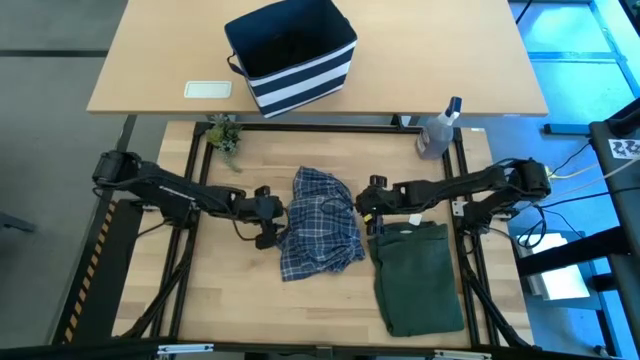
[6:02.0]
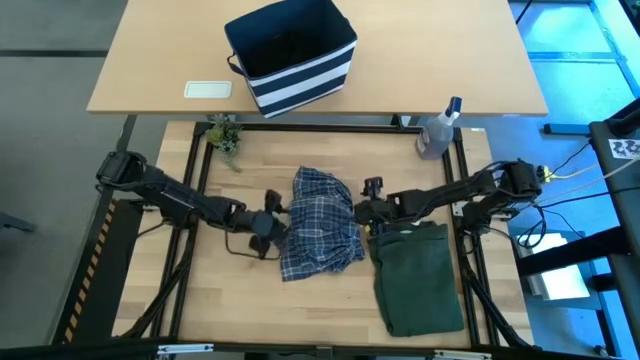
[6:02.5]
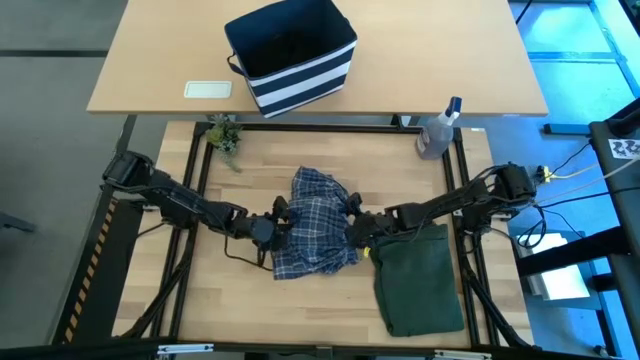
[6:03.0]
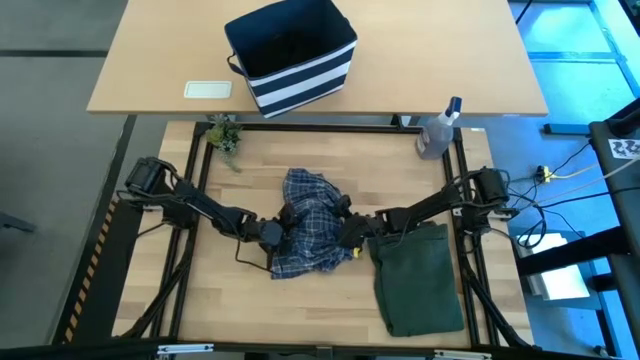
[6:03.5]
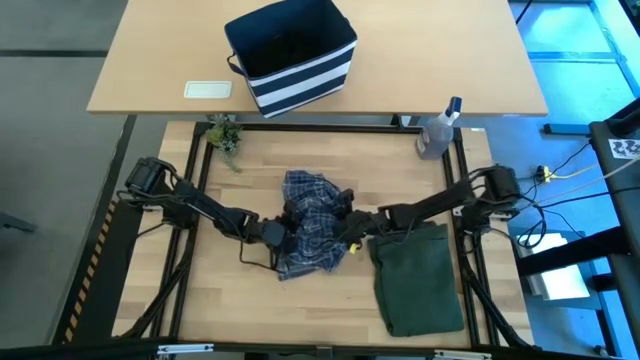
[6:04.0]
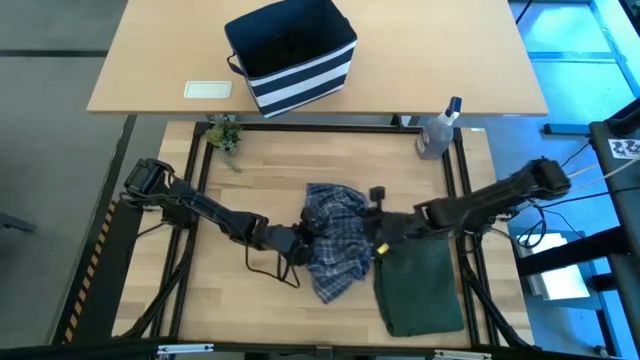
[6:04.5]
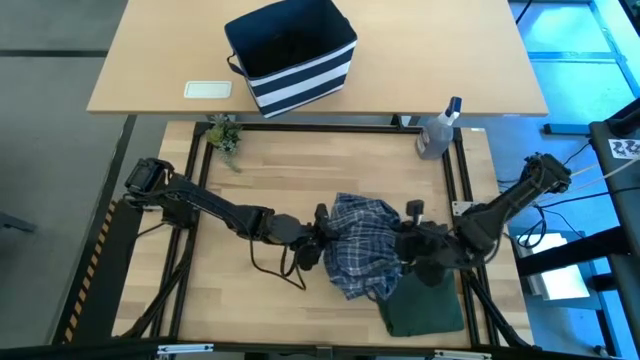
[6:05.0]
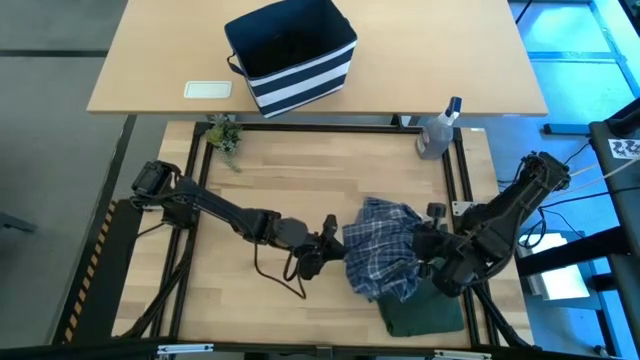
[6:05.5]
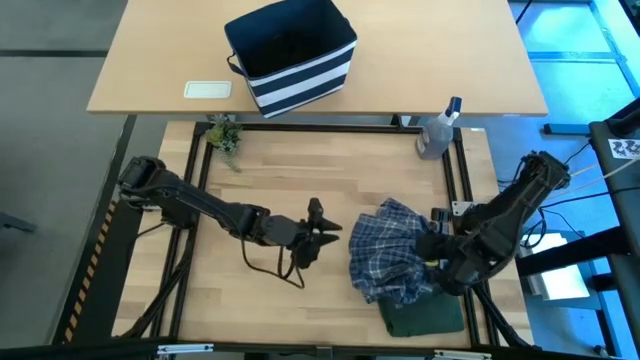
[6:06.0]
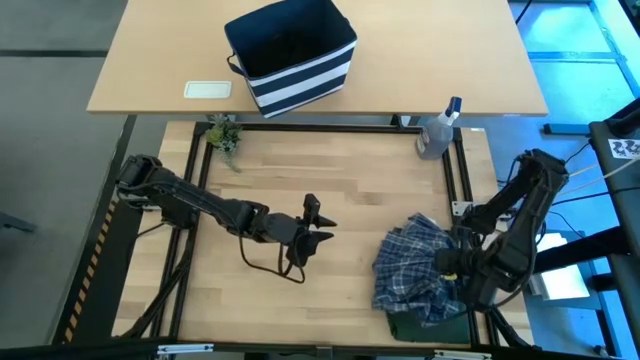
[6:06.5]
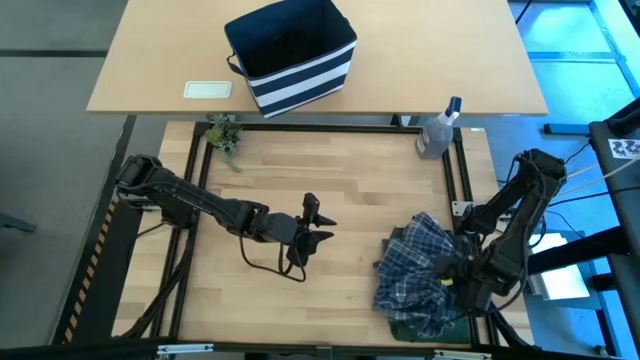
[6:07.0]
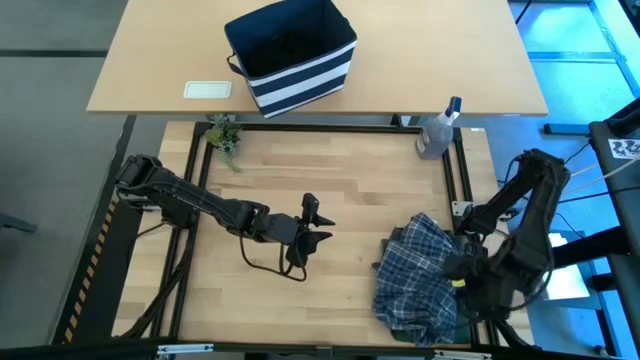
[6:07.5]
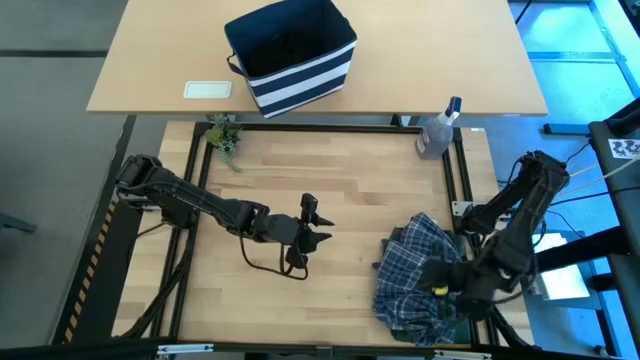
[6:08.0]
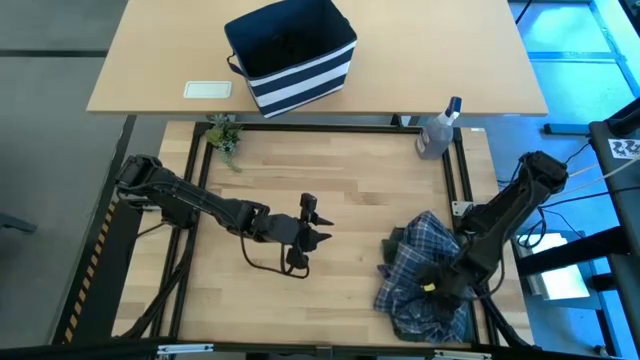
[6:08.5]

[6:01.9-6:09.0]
Task: Fold Laundry from Bin
Stack the blue checkered pants on top of the green polo shirt

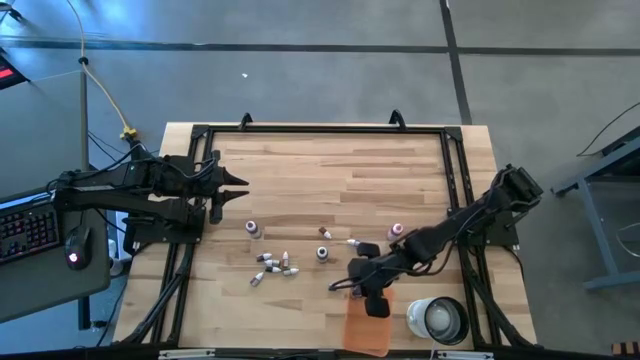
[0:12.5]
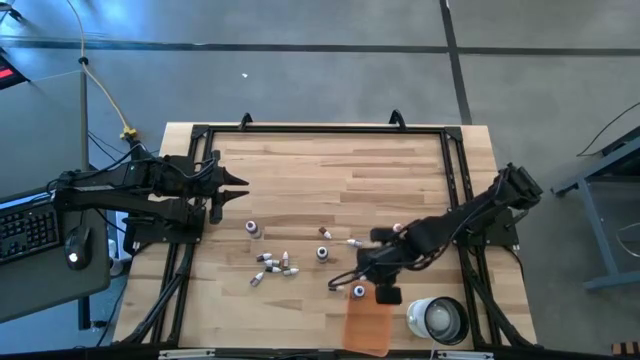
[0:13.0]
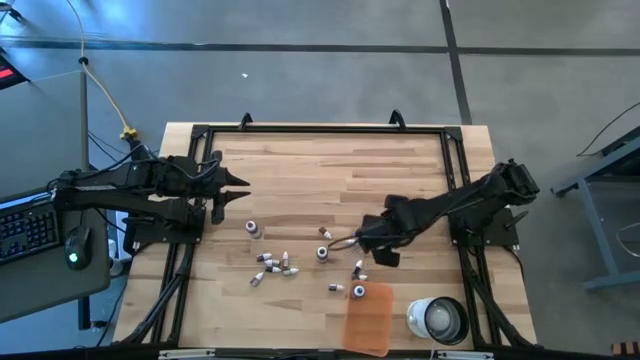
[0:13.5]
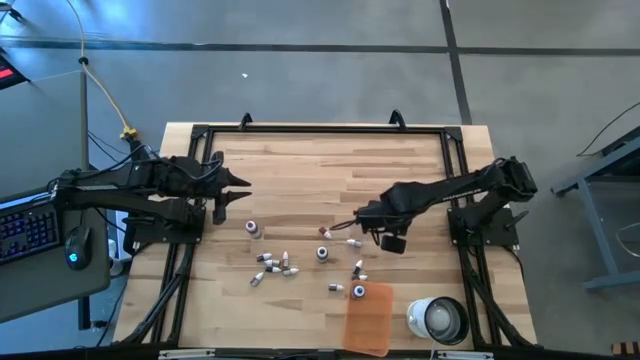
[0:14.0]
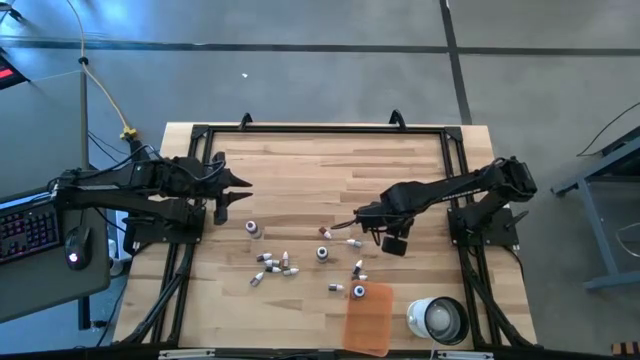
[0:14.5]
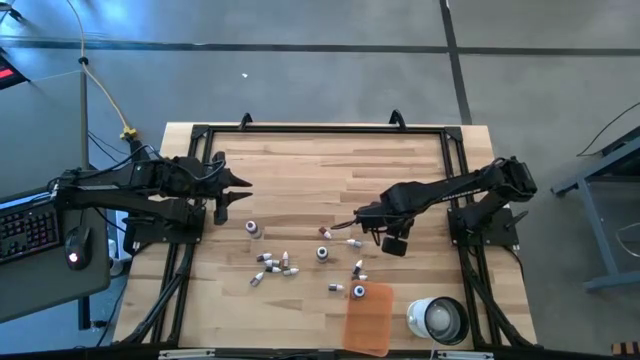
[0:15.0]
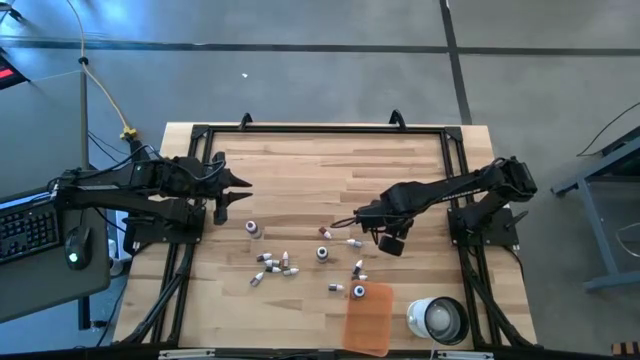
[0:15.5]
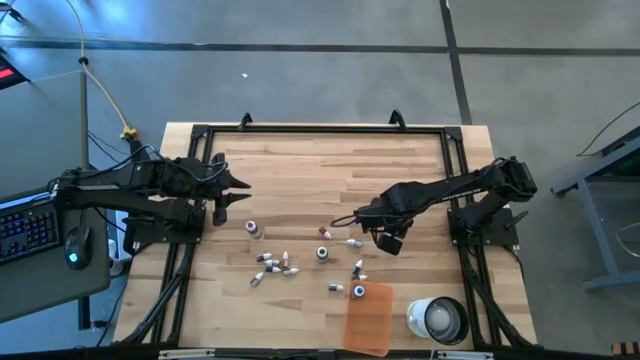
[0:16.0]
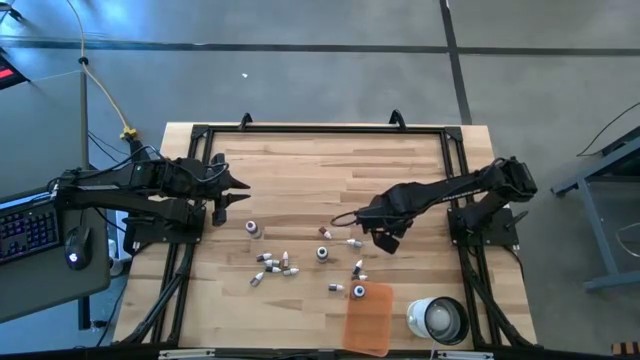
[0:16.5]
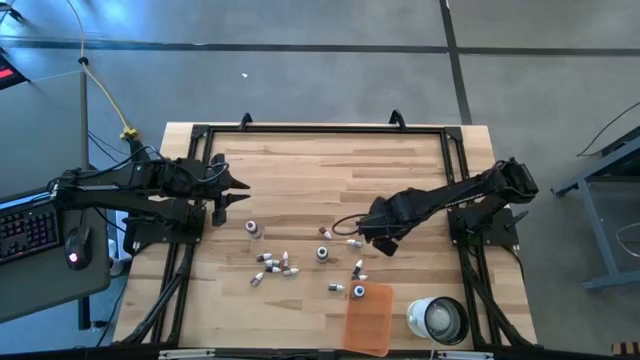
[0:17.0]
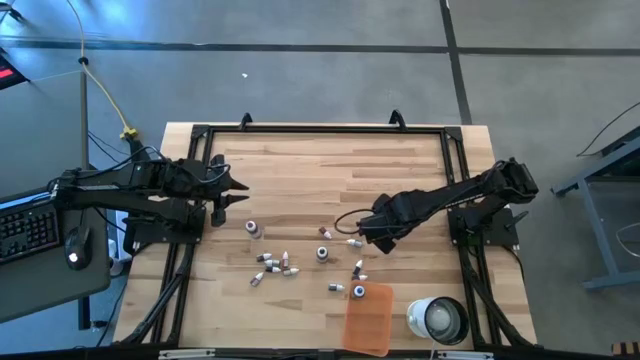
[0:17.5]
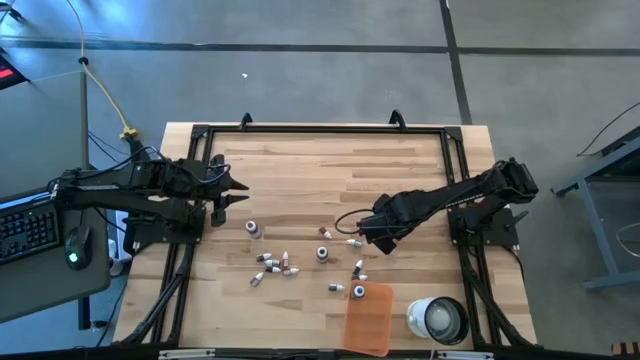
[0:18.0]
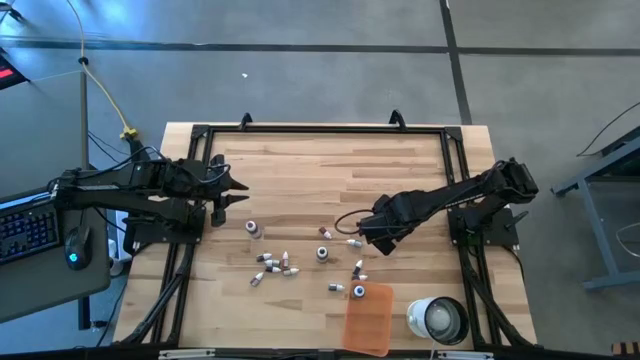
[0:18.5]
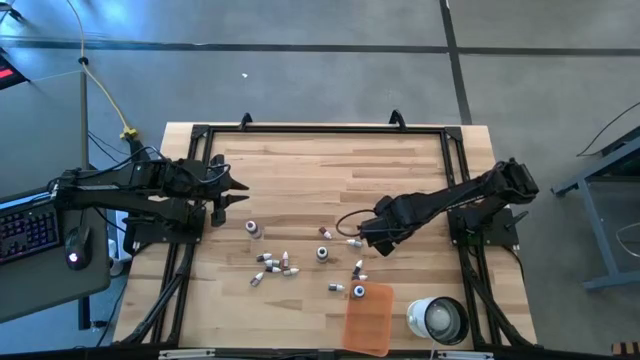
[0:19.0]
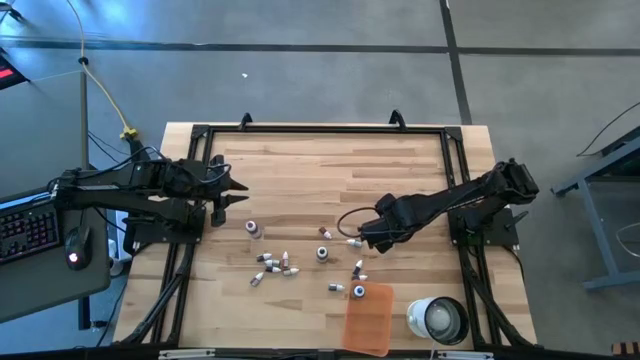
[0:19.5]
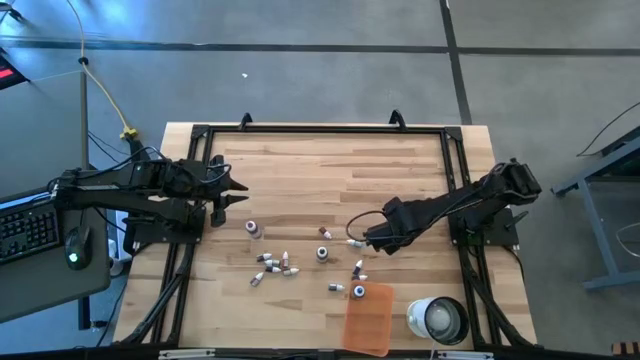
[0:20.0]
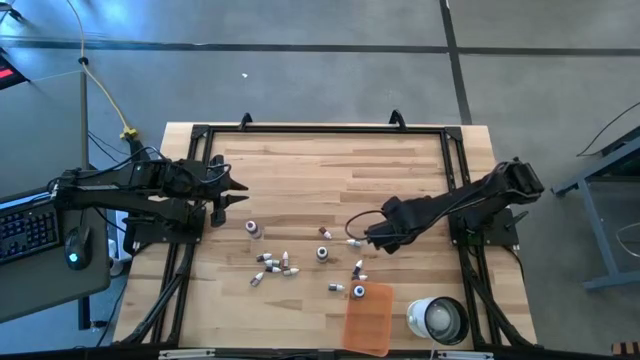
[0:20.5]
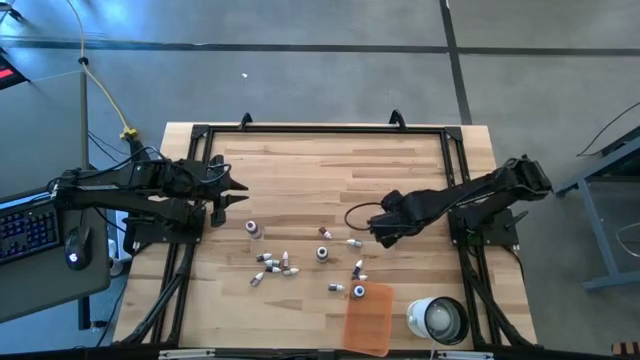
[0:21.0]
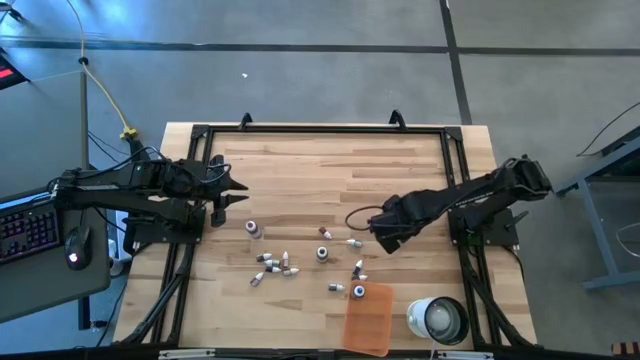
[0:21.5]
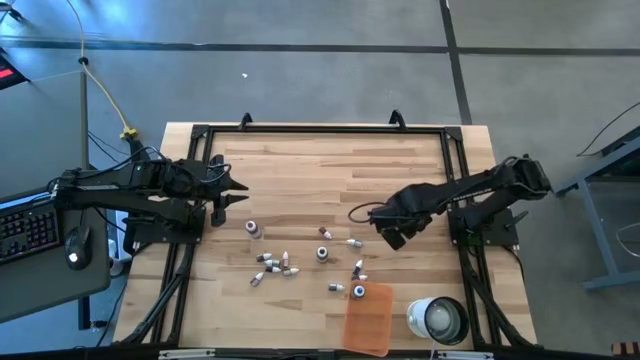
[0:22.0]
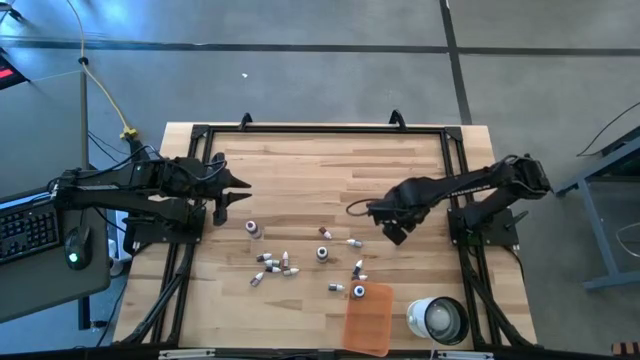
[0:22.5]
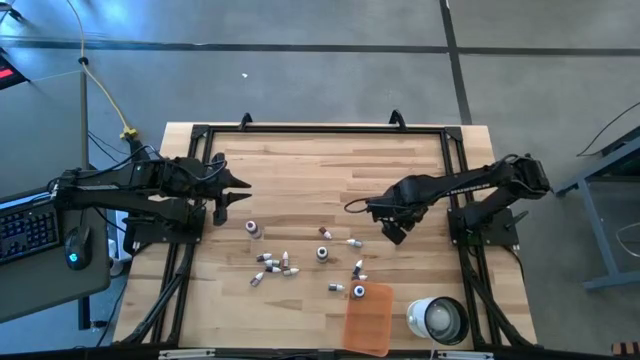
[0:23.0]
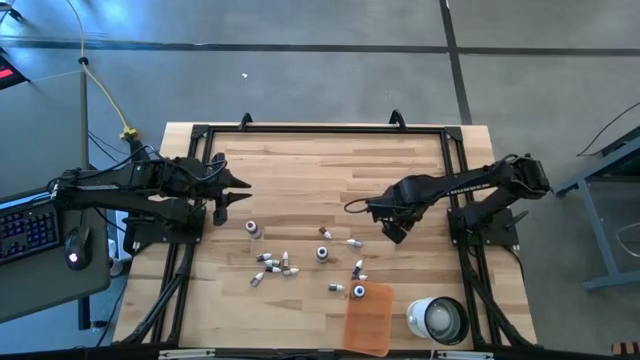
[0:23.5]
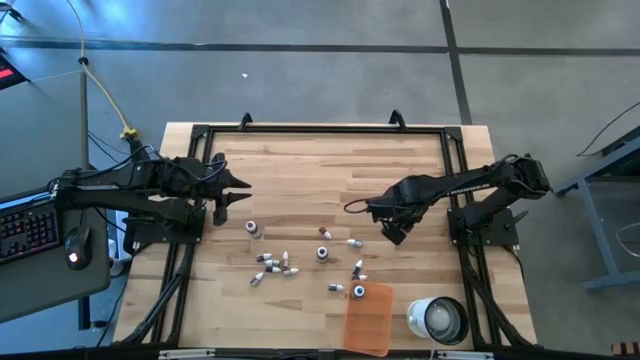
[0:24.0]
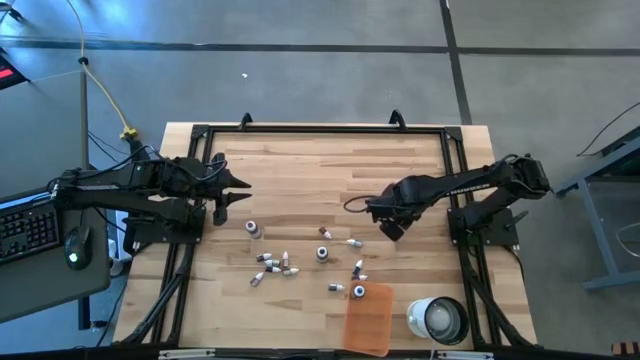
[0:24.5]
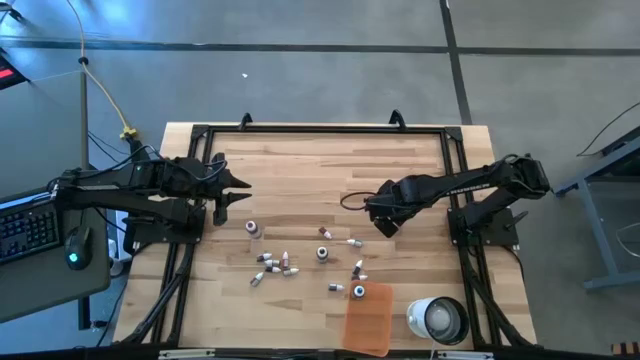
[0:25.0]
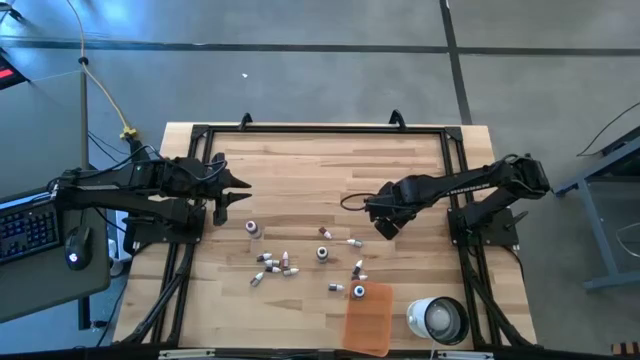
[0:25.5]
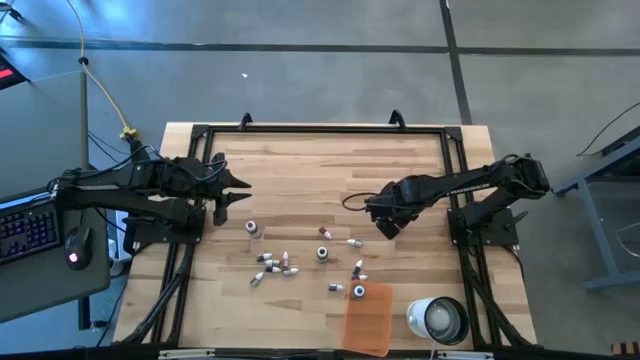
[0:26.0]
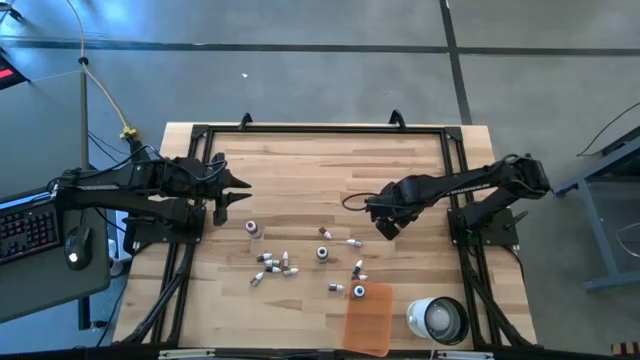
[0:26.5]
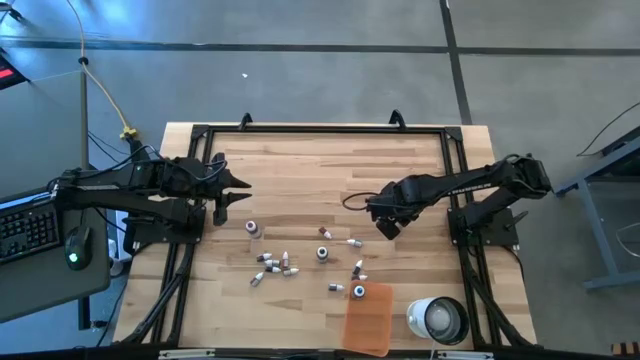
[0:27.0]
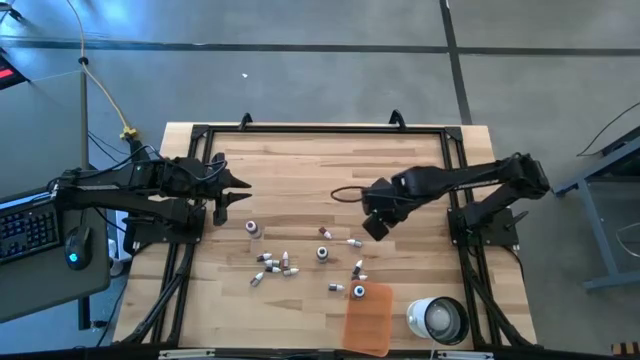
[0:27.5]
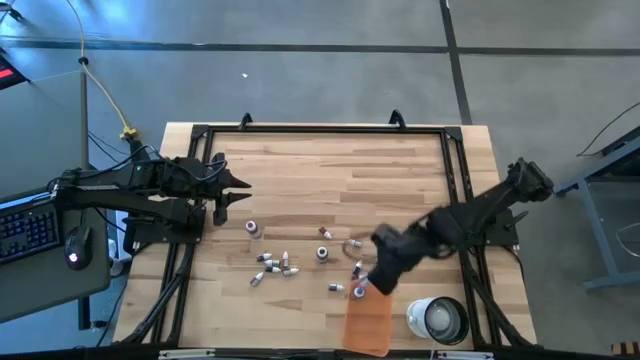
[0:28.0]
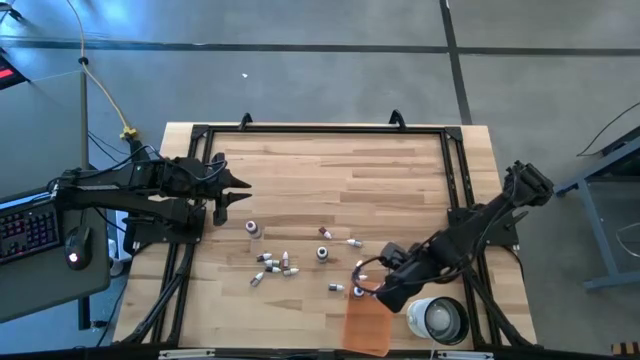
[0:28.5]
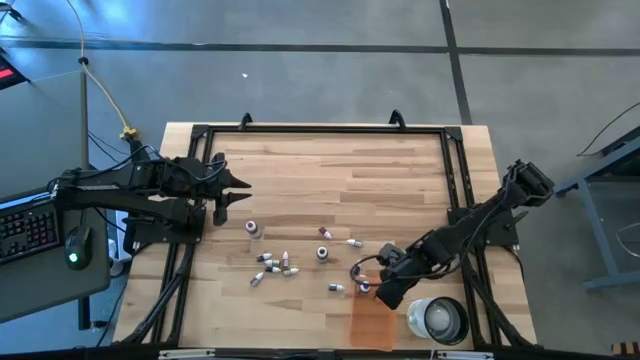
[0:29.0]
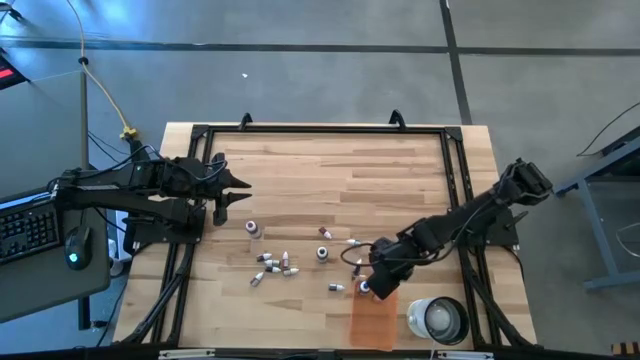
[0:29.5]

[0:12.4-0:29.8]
Task: Pick & Place food coloring
Put the large pink food coloring bottle into the orange bin
